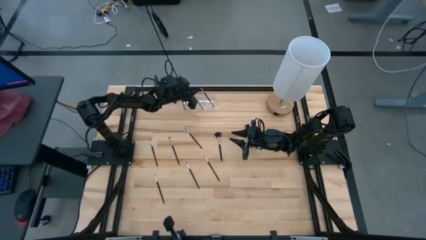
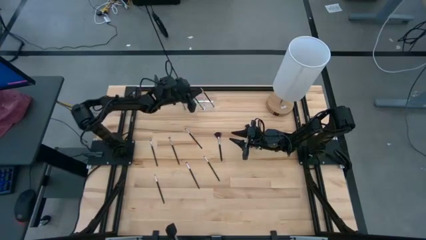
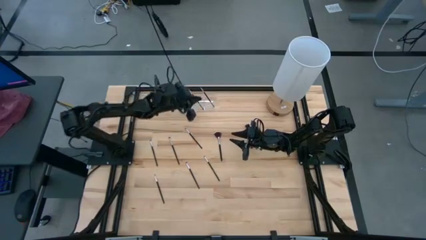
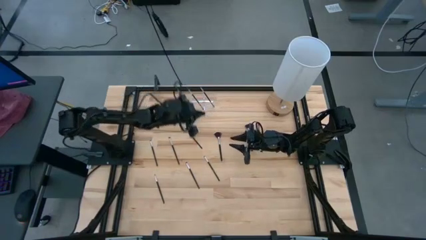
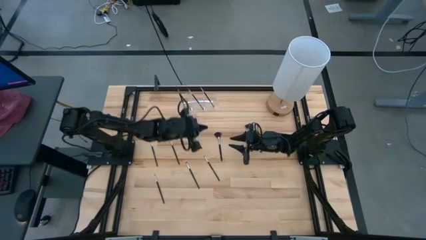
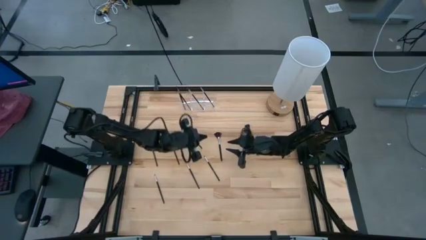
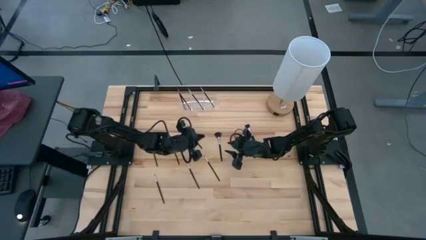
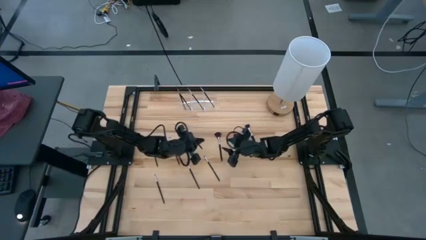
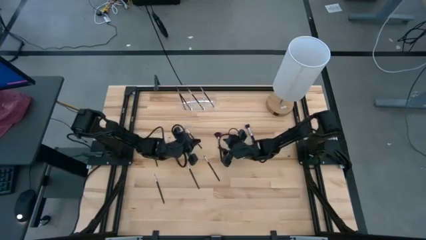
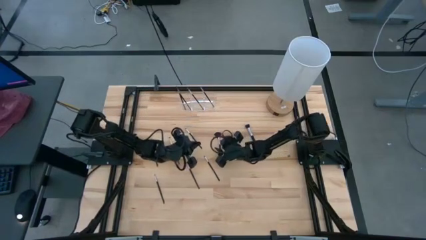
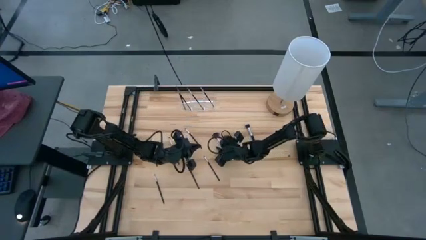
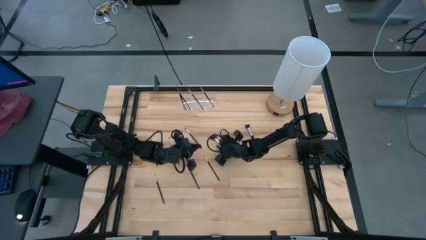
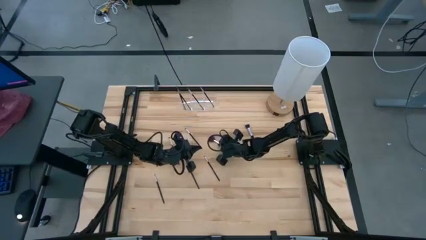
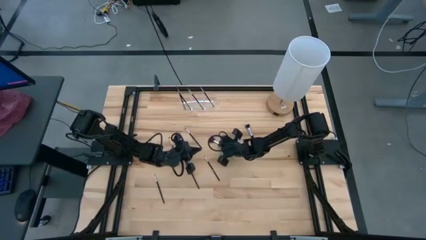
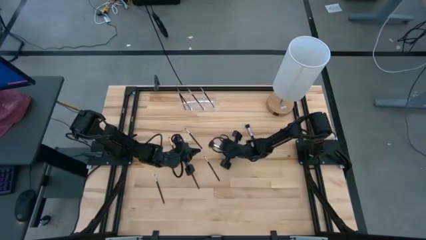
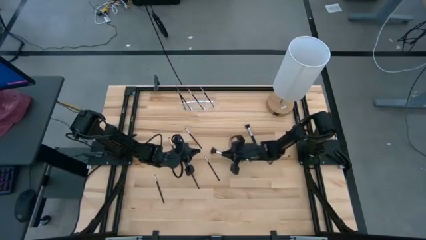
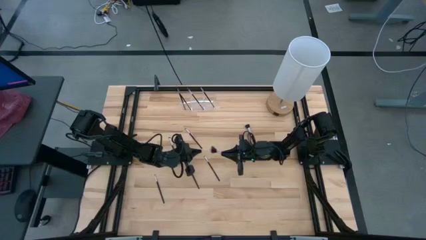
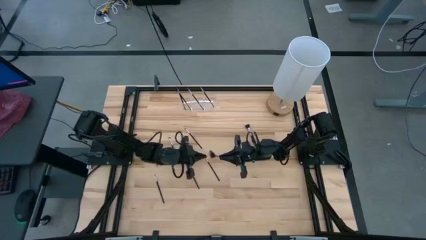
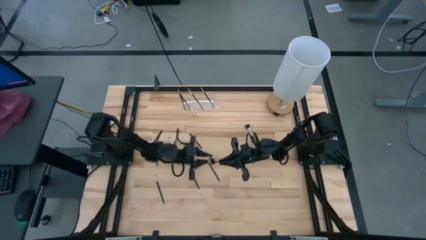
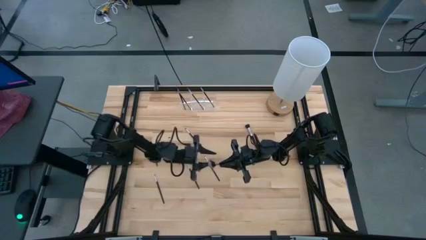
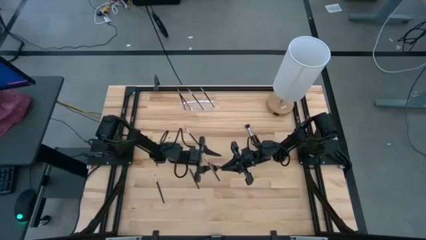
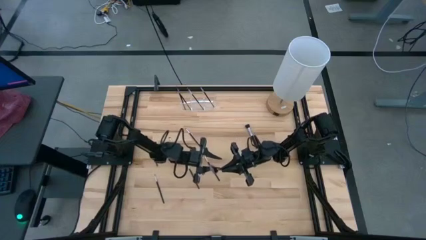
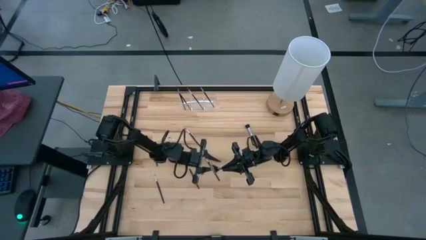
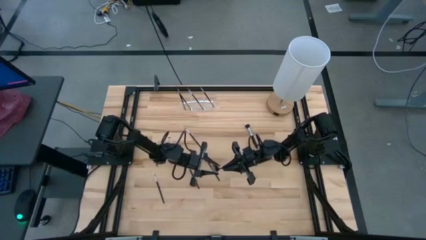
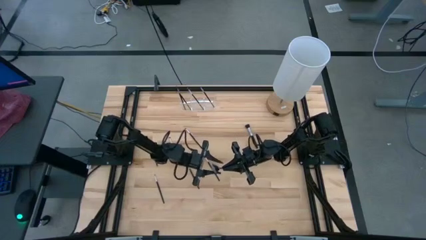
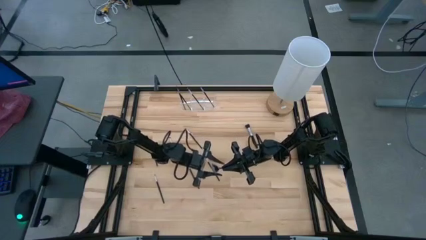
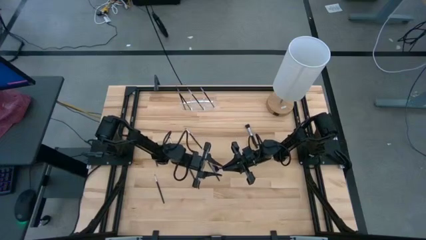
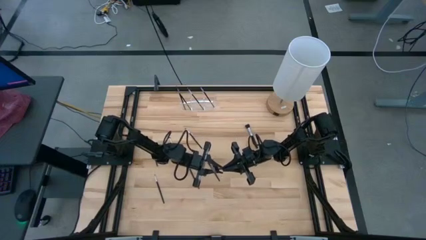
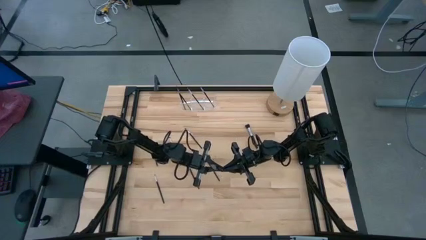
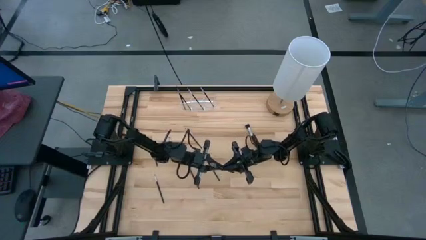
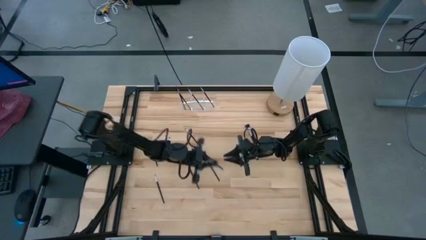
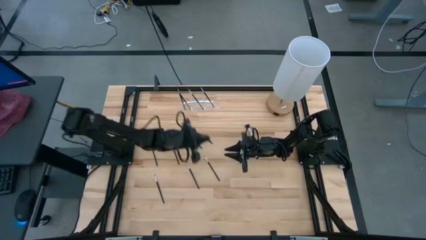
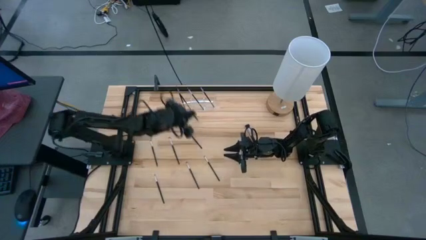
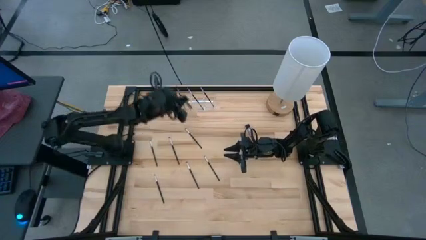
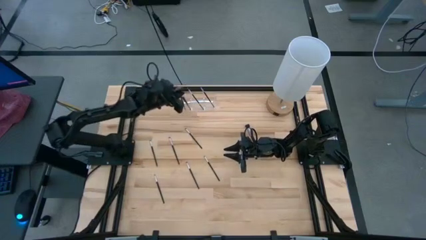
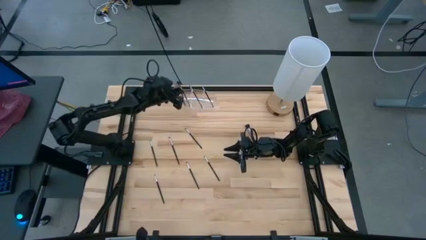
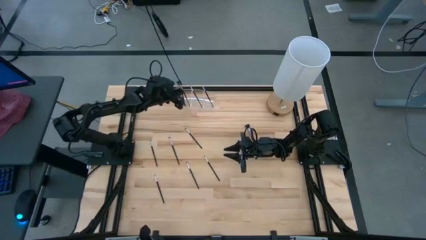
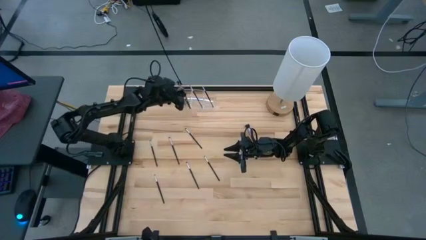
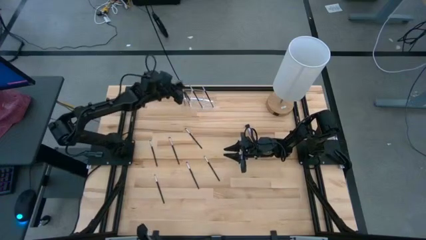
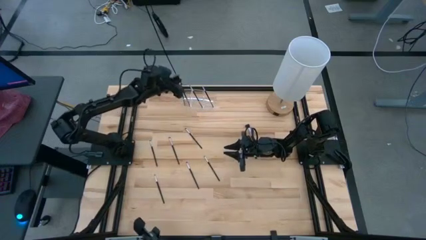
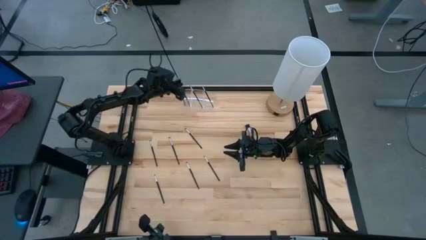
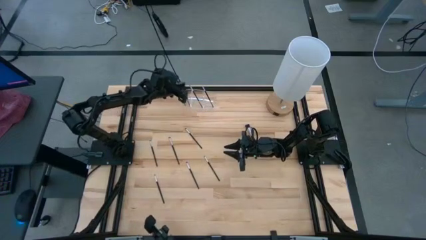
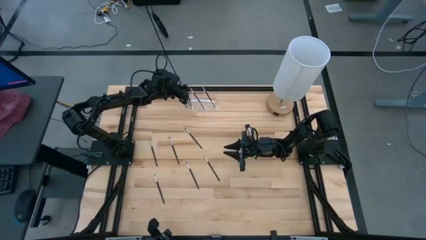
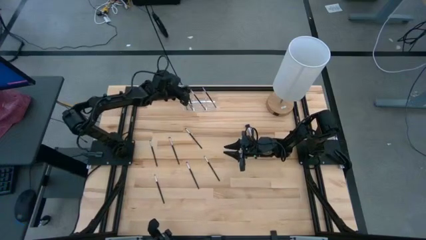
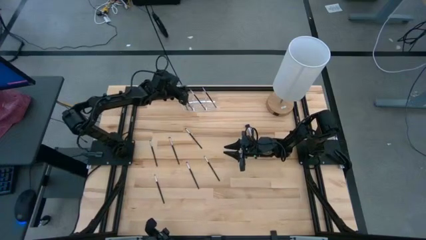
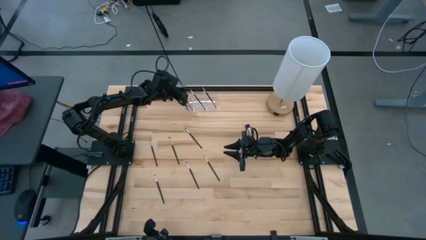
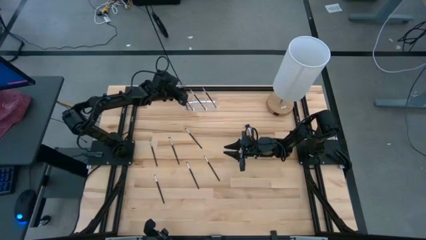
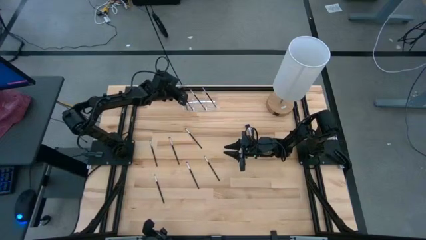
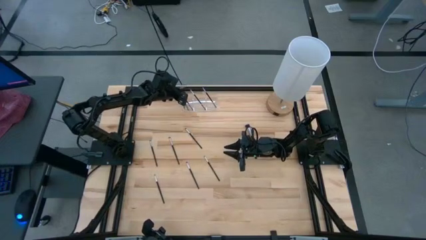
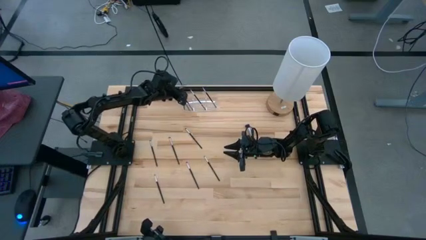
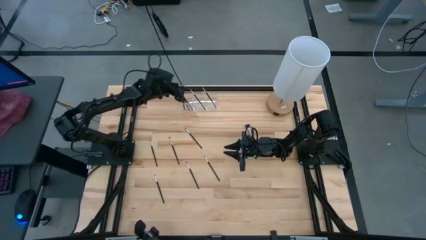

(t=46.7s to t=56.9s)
Task: Put items in baskets/containers
Put the black highlighter brush into the transparent organizer

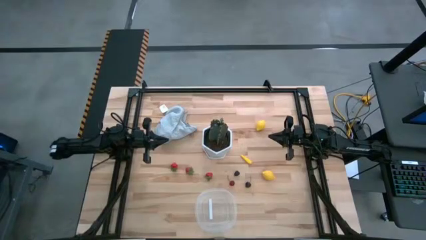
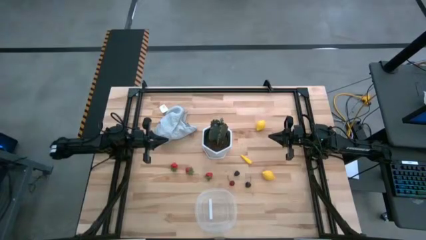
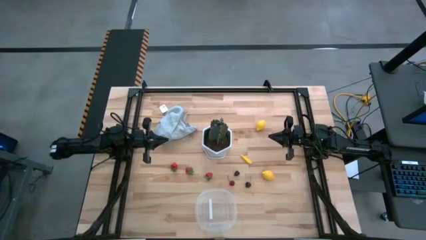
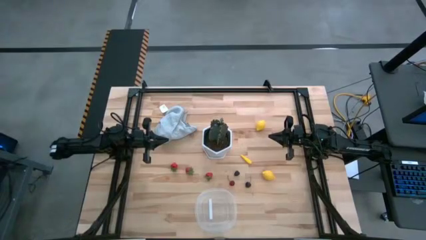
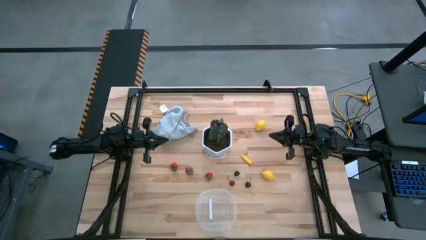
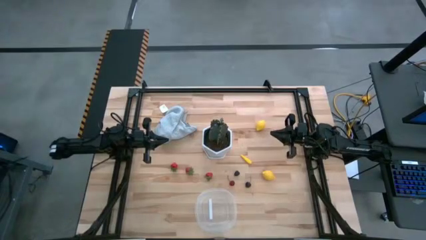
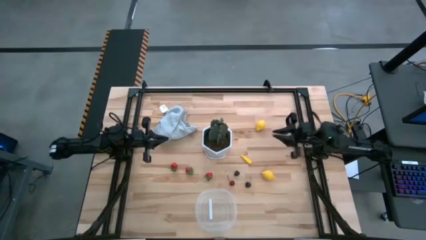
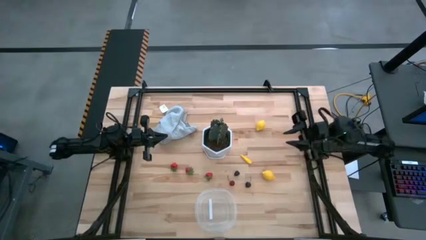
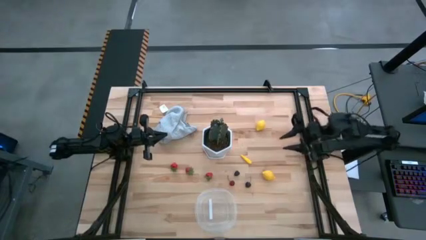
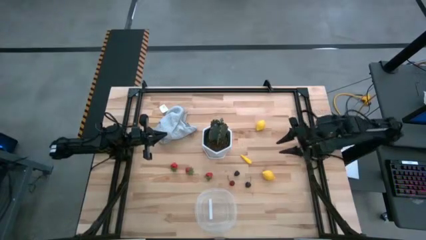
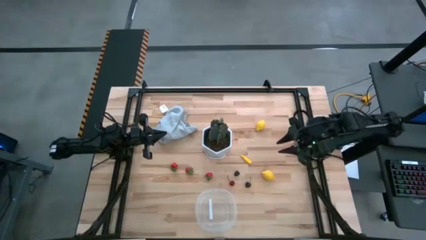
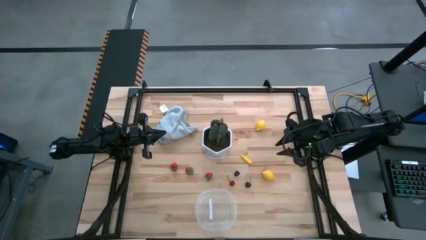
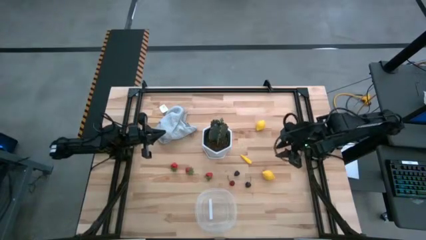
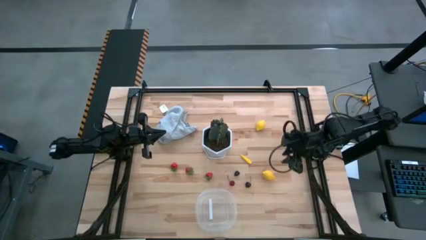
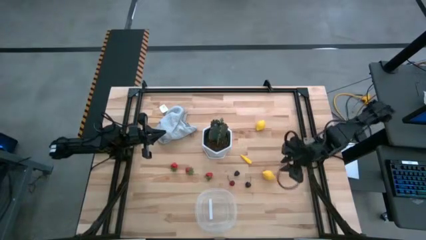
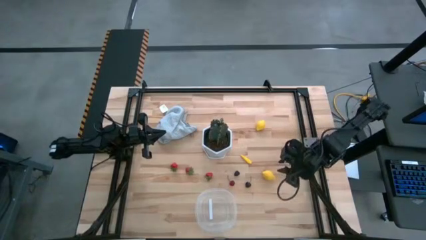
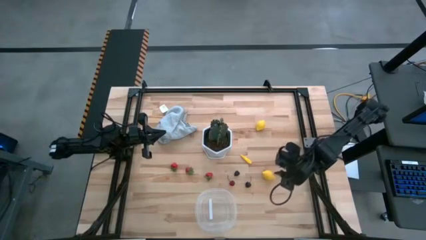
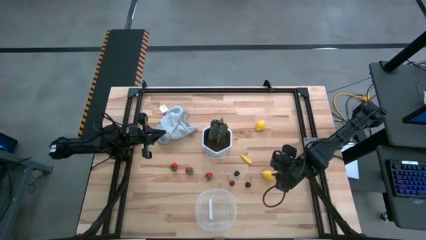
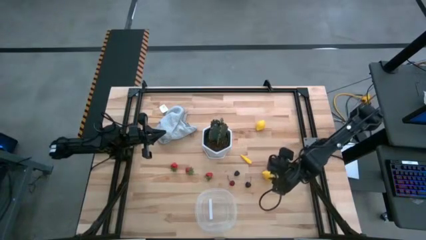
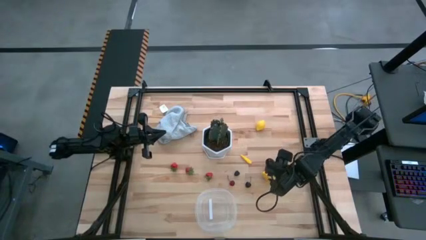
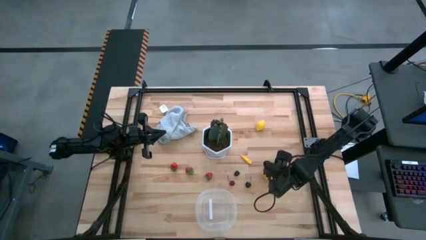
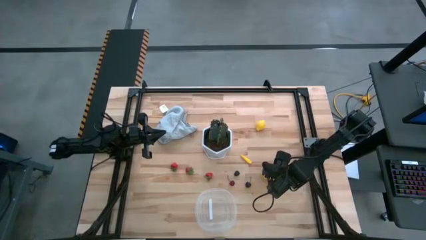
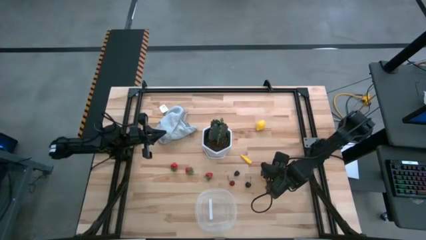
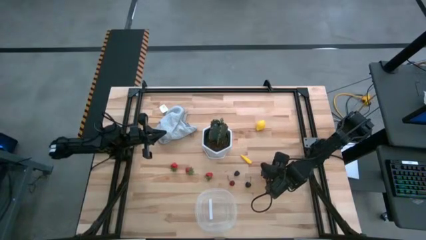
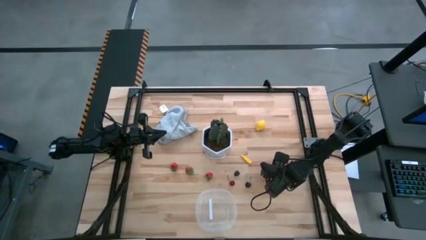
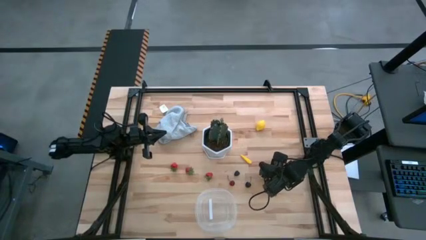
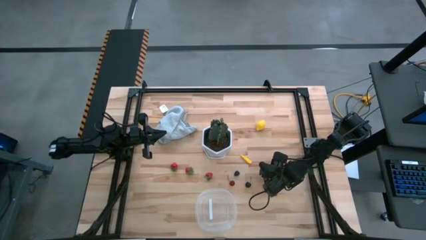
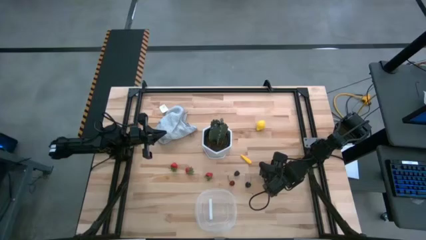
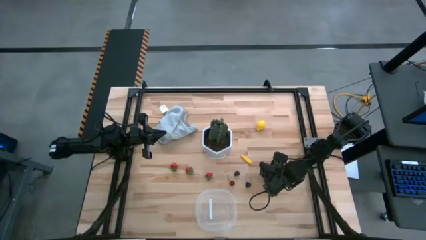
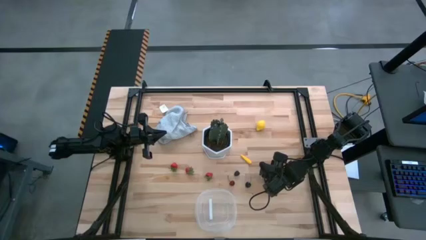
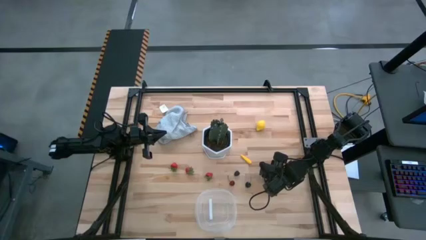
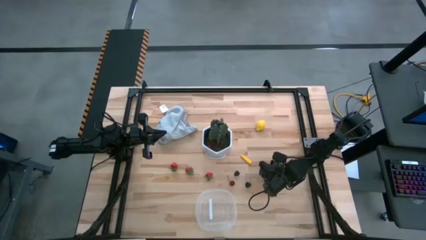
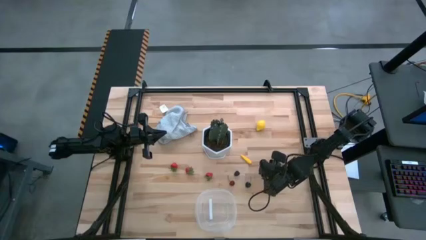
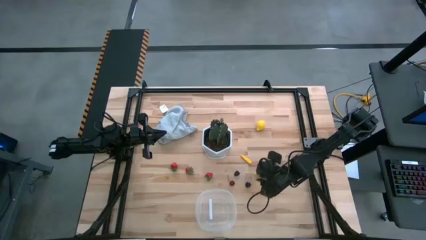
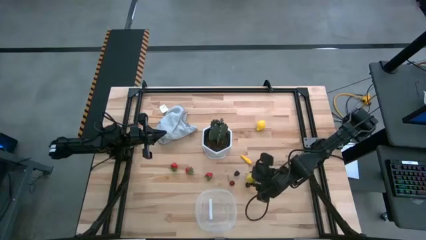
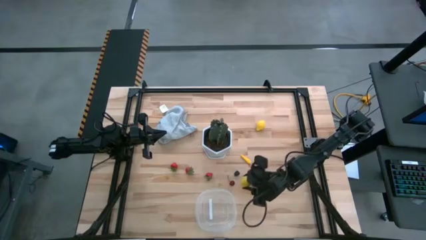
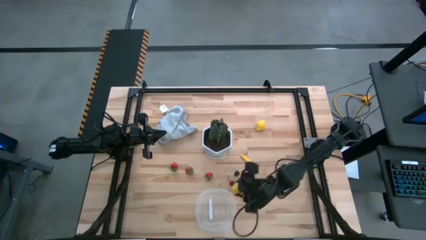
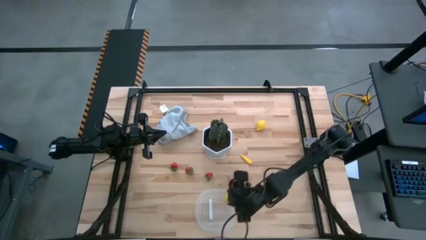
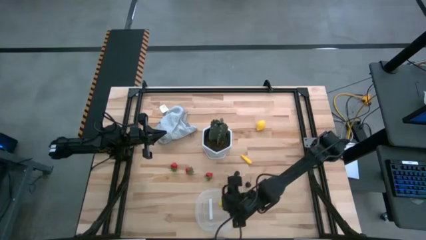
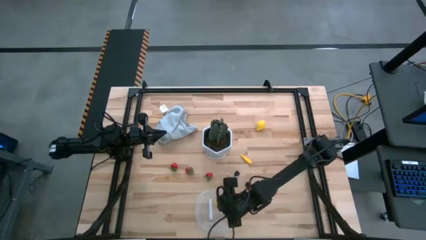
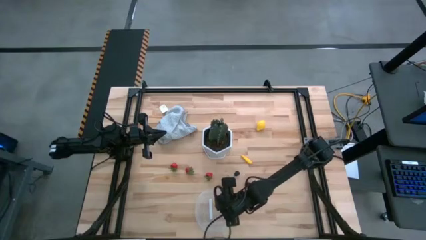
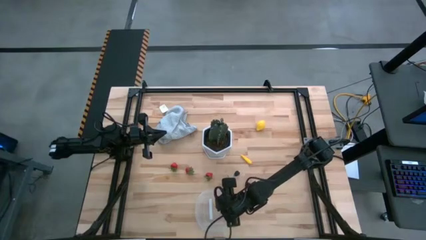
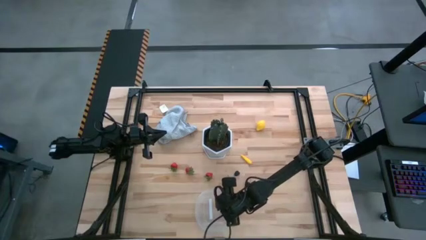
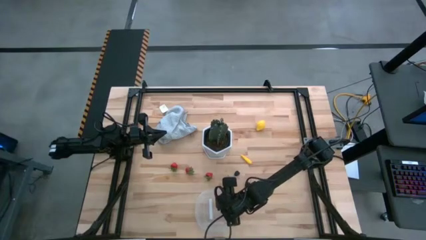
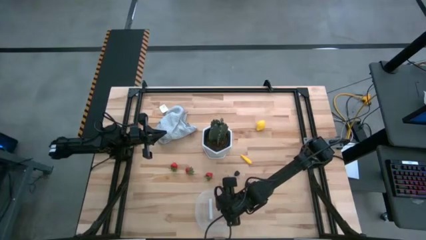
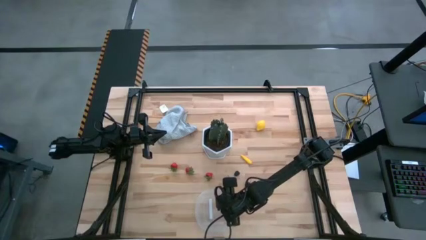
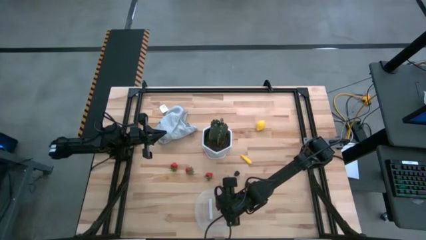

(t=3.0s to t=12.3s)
Task: Pick and placing Produce into tupperware
Put the bottom yellow lemon into the transparent bin
